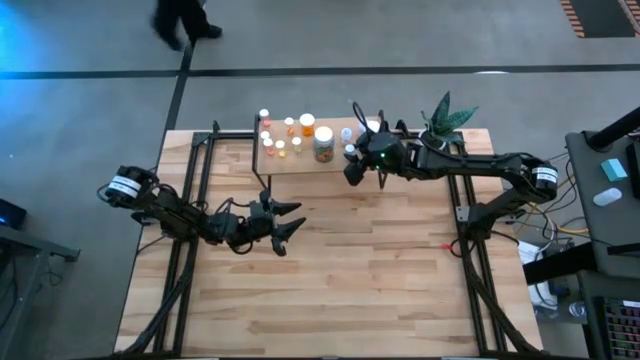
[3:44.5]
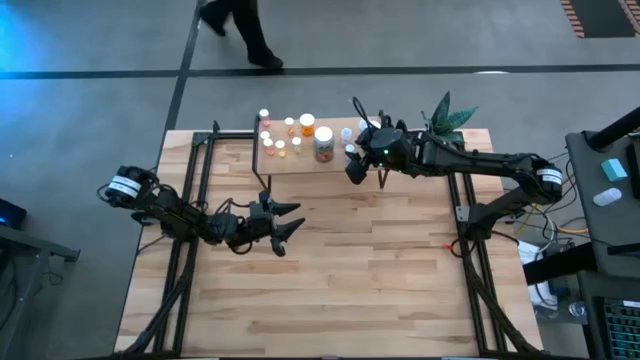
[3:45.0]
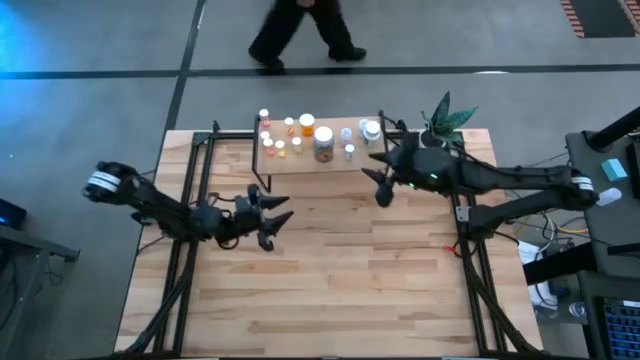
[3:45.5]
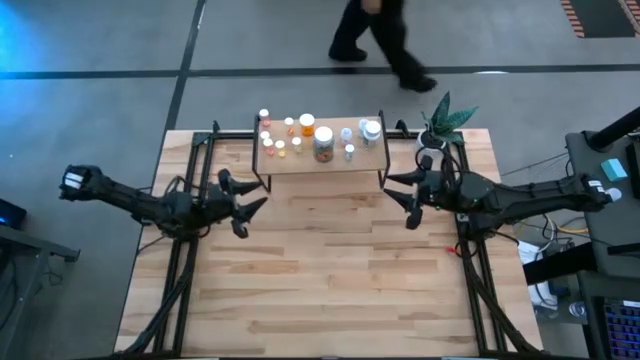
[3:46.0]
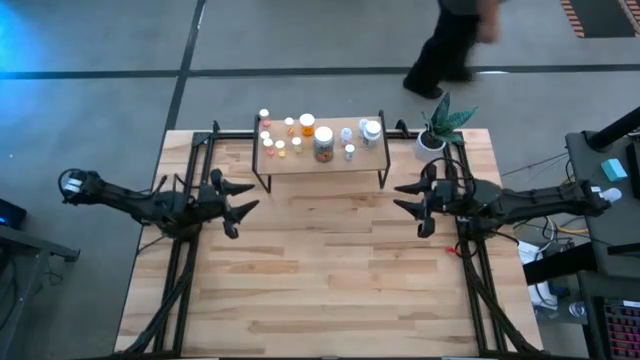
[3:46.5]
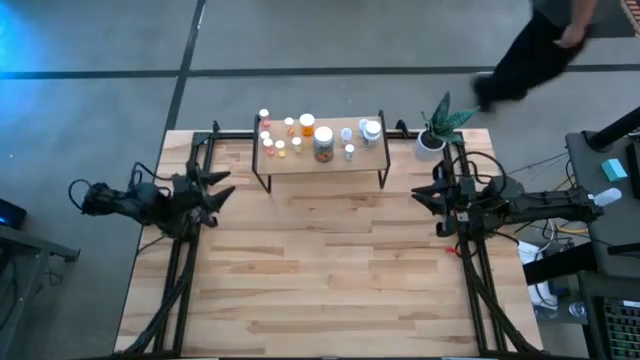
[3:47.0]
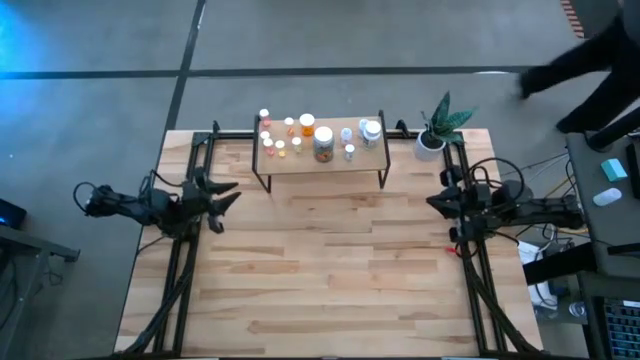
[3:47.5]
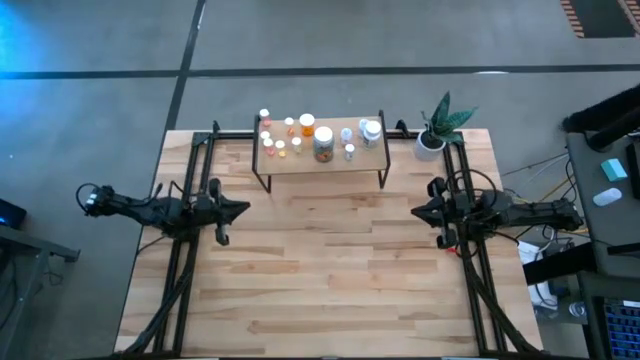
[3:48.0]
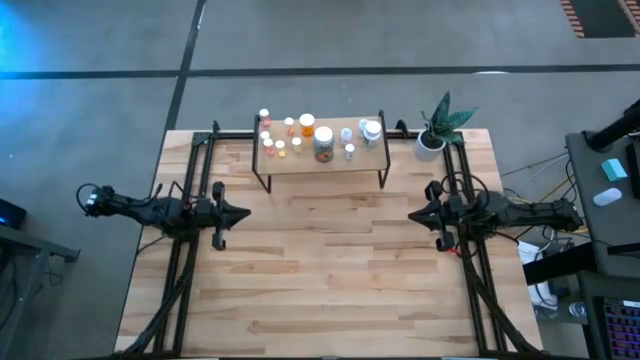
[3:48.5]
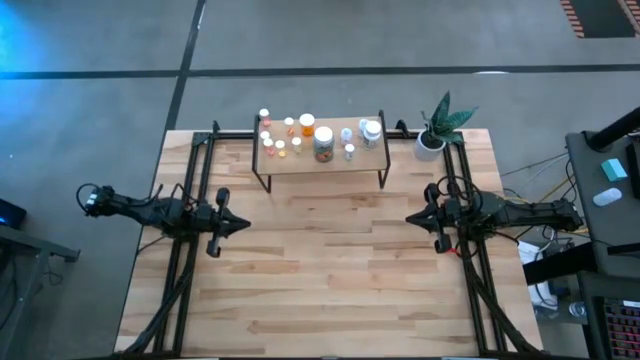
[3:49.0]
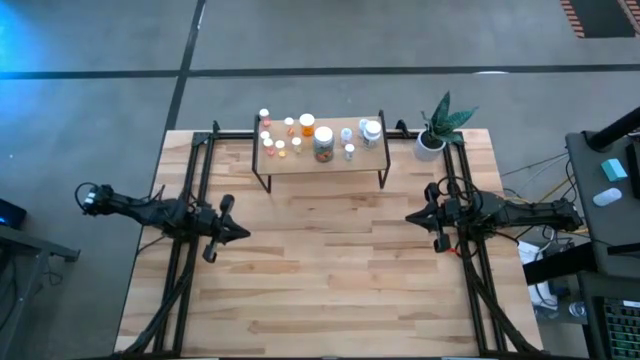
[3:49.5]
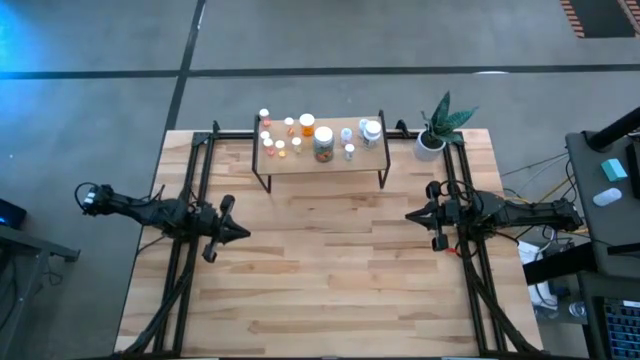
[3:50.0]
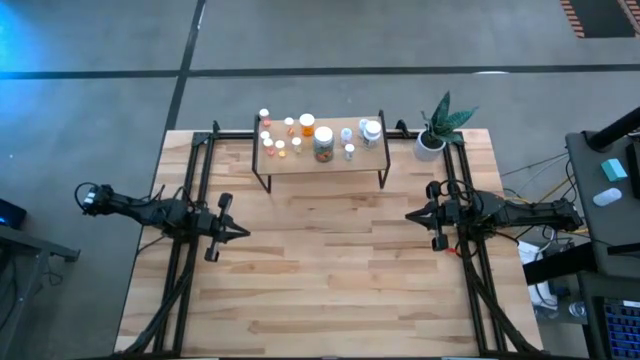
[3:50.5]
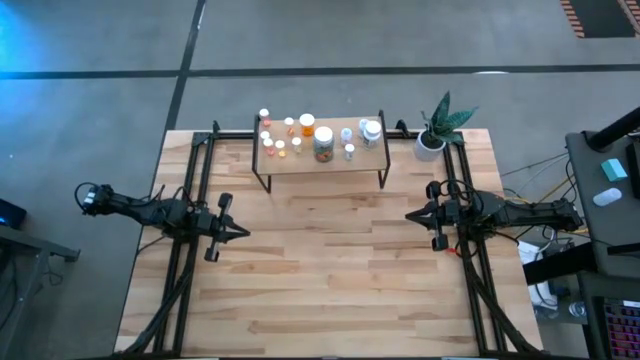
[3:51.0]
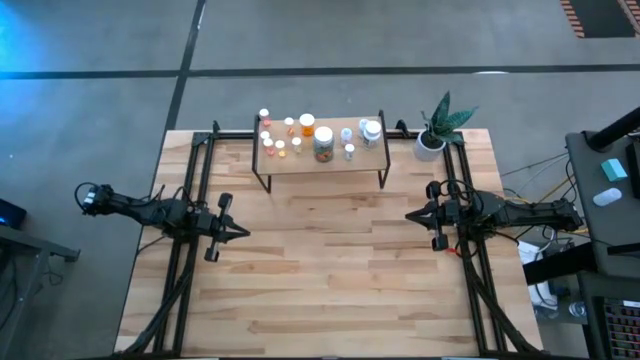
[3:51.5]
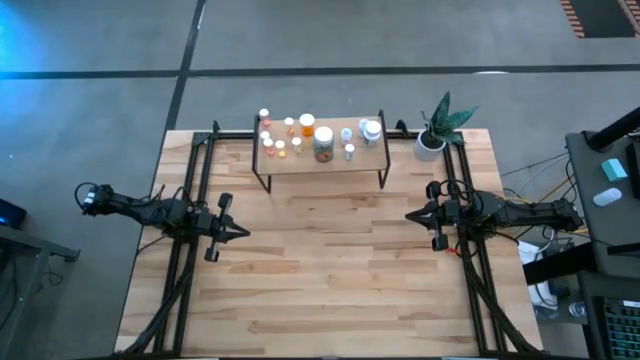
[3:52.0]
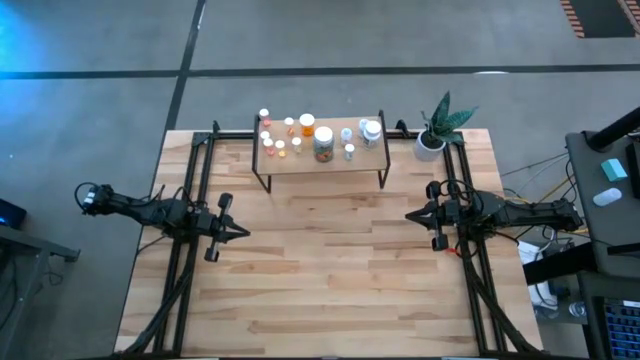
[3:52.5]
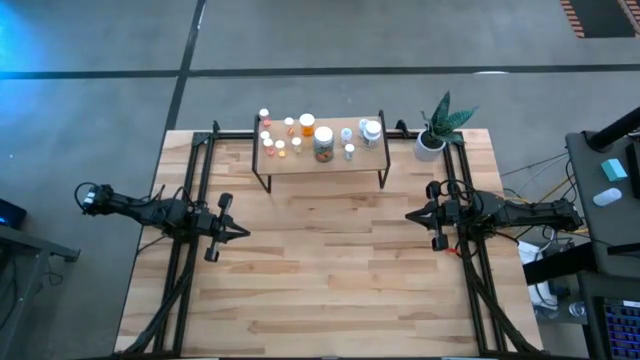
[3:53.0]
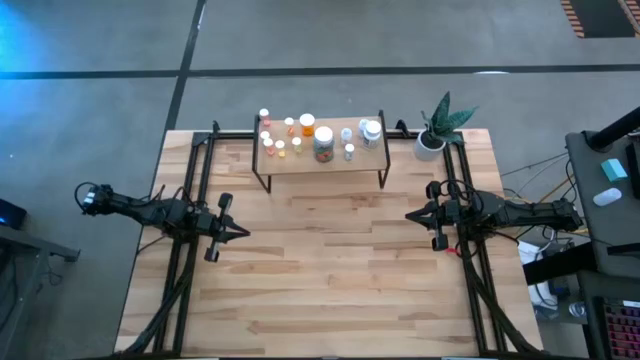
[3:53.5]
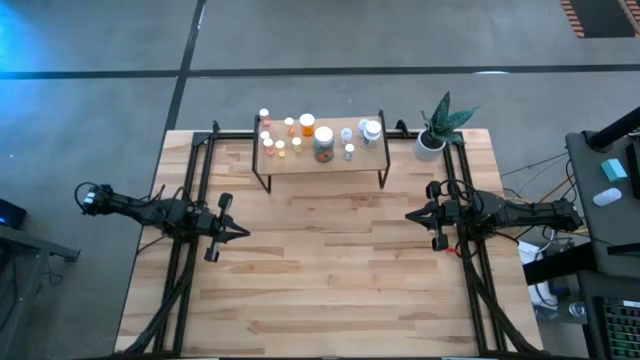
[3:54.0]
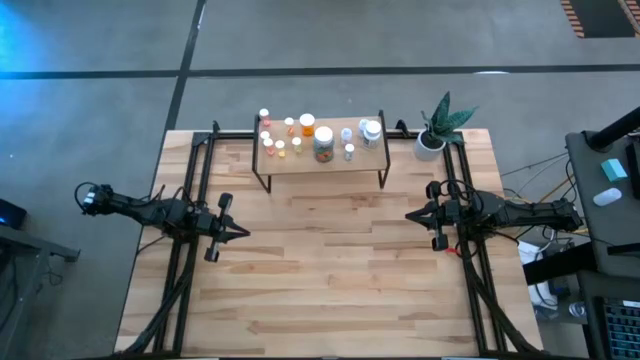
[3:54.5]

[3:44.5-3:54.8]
Task: Pick and place medicine bottles onto shelf by color
Return to Home Position
